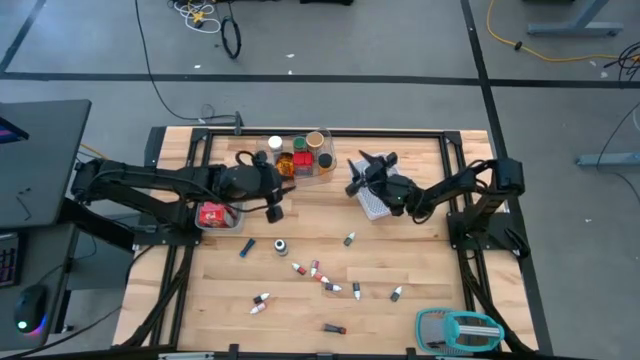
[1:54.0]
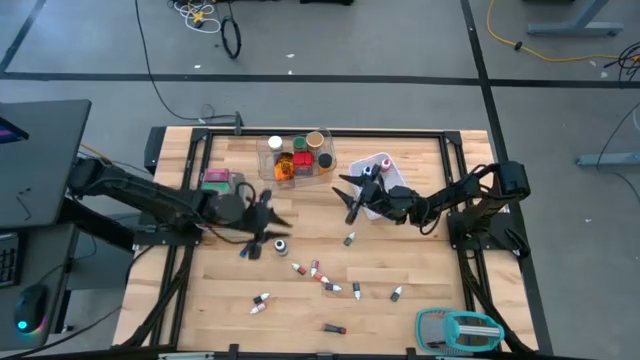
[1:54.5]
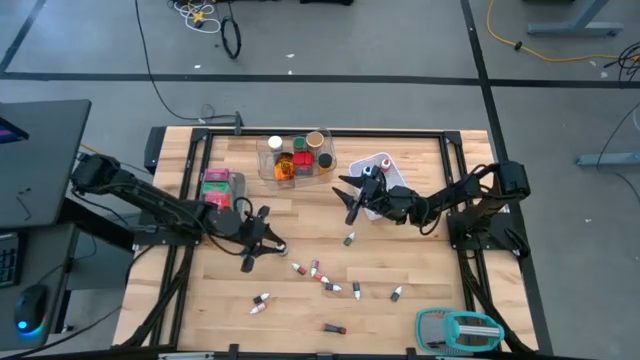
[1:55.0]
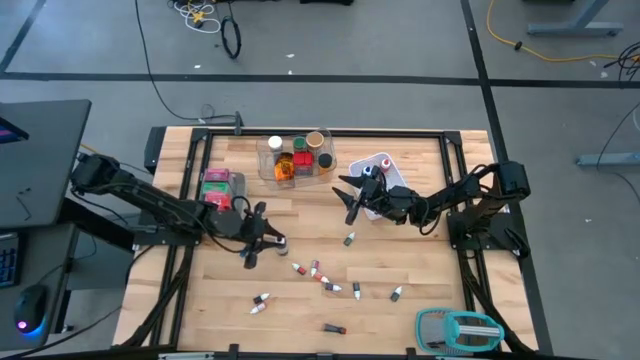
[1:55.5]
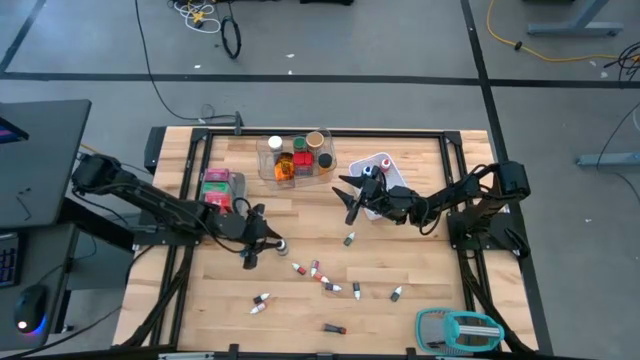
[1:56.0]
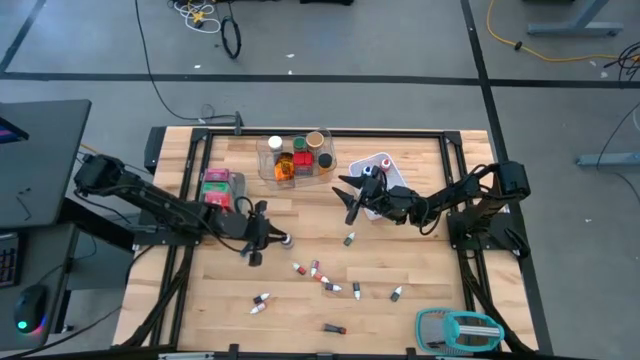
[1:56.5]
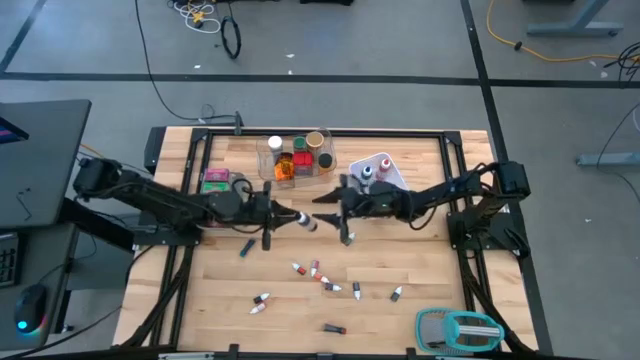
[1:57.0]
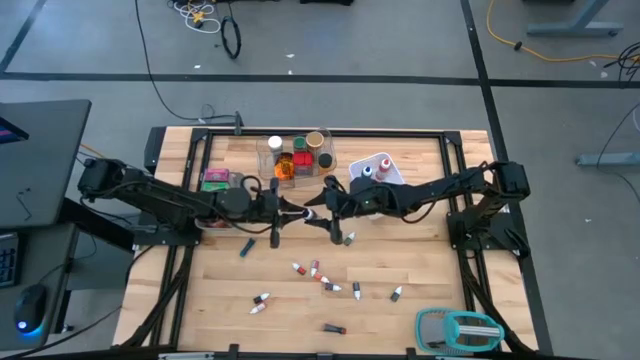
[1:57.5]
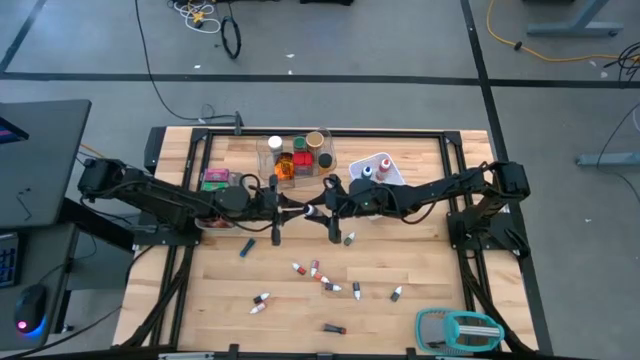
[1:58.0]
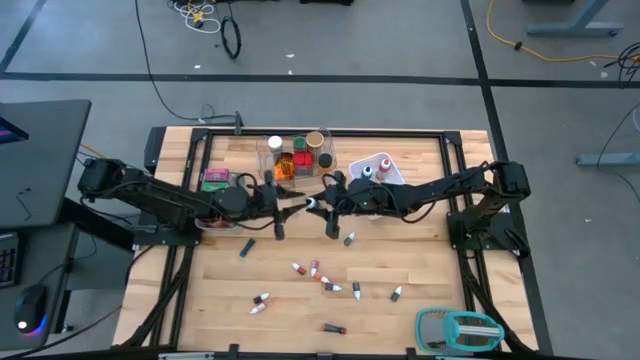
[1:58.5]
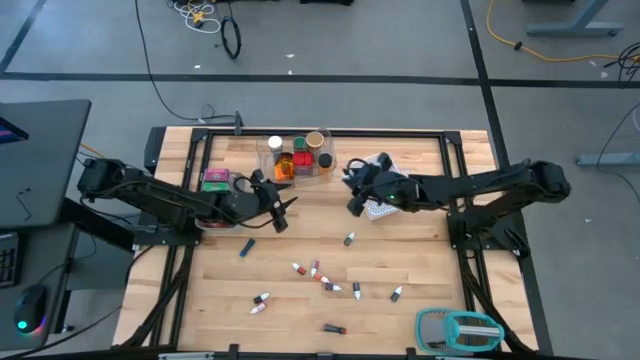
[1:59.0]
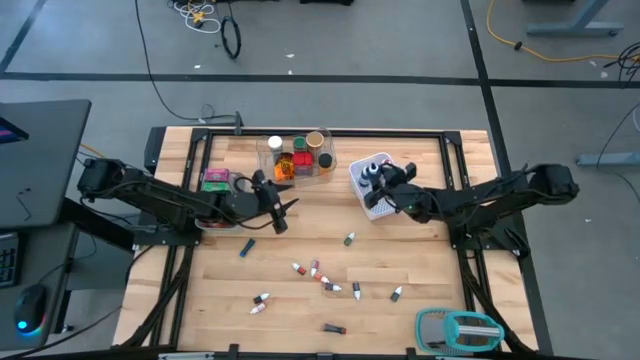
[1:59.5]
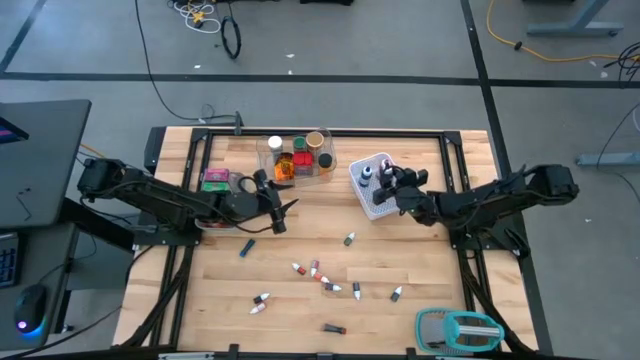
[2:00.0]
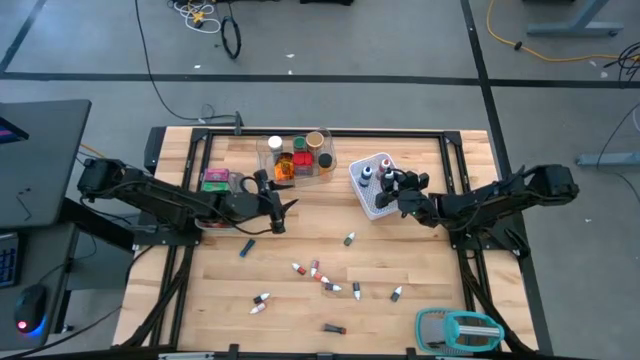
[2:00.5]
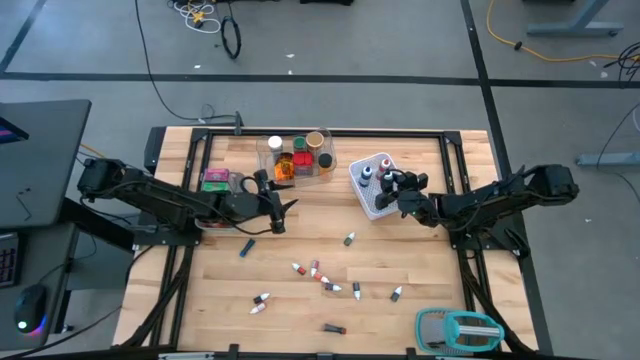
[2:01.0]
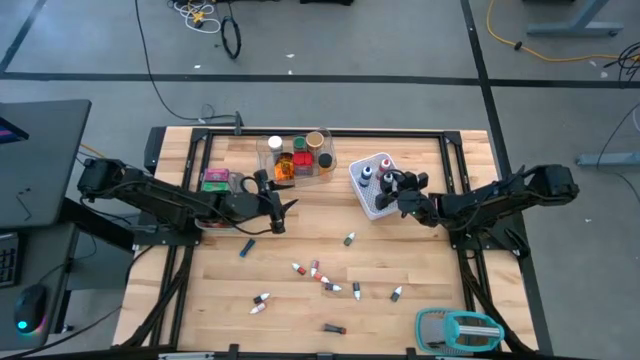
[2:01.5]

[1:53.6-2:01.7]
Task: Pick & Place Kitchen Items
Put the big black food coloring bottle into the white bin

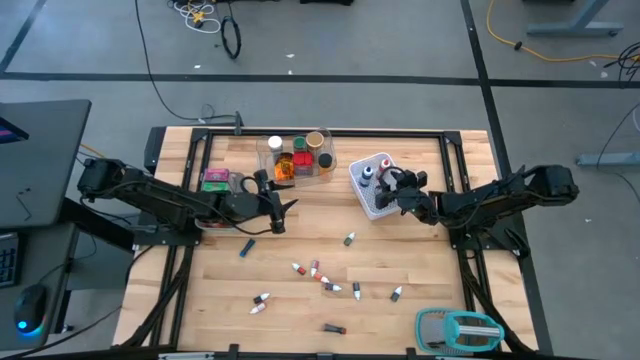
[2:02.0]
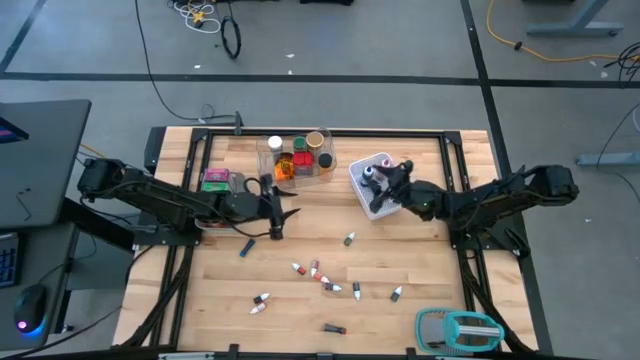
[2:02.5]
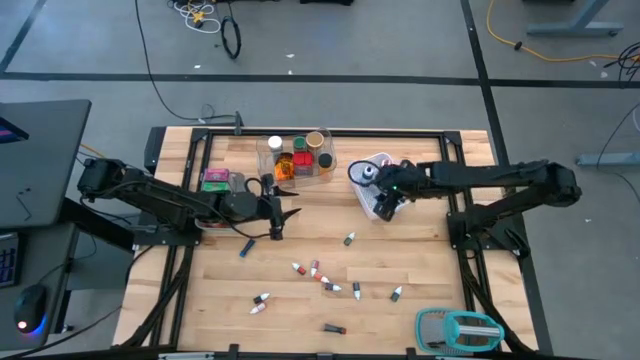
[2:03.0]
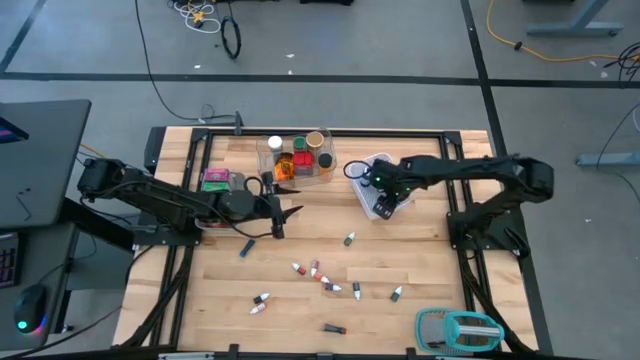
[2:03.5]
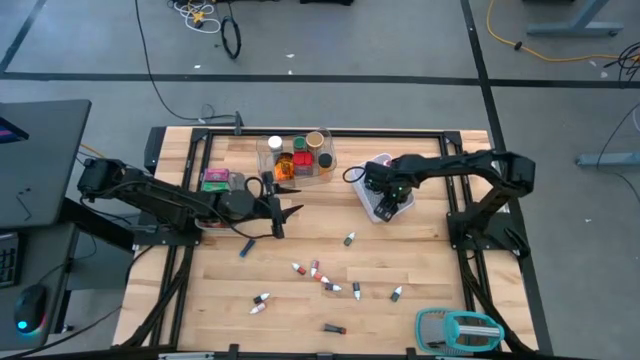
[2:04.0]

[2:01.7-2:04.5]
Put the big black food coloring bottle into the white bin

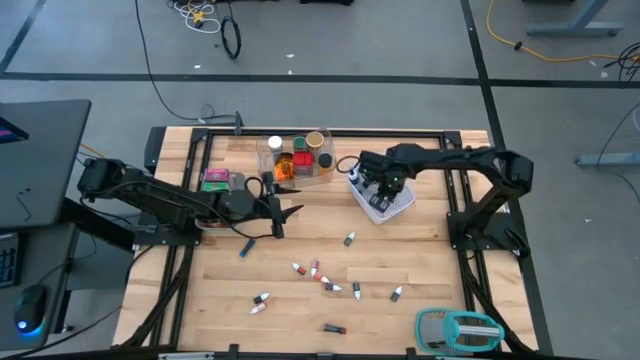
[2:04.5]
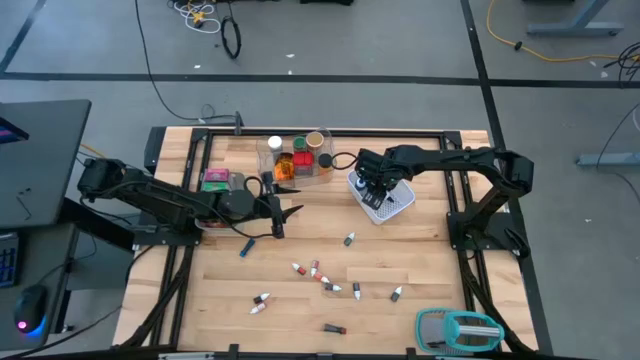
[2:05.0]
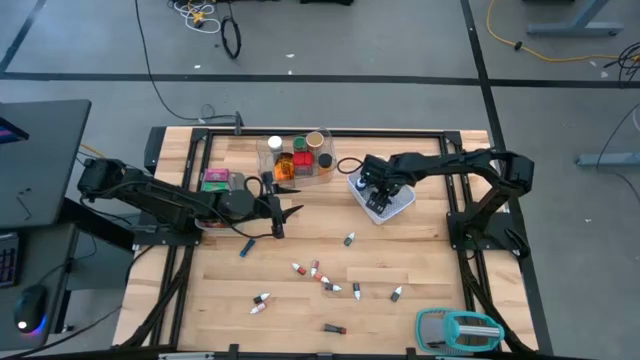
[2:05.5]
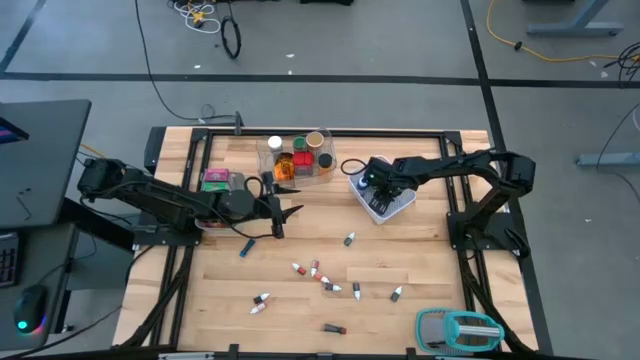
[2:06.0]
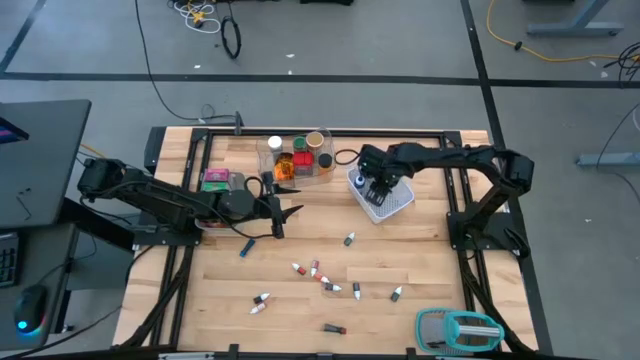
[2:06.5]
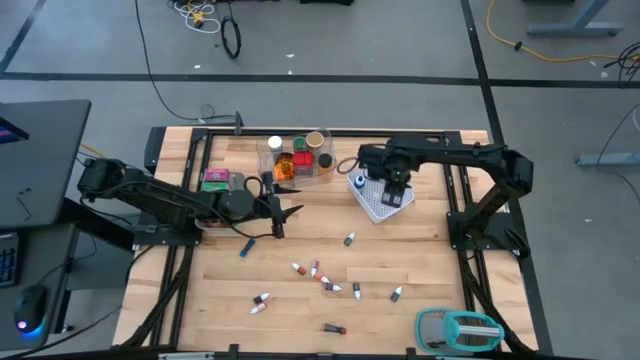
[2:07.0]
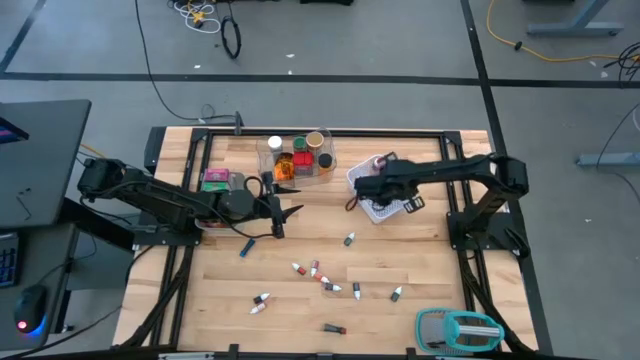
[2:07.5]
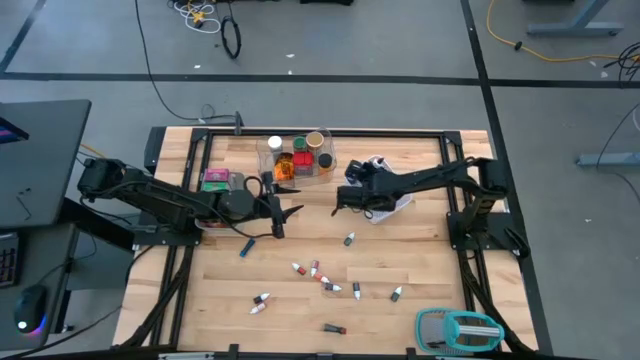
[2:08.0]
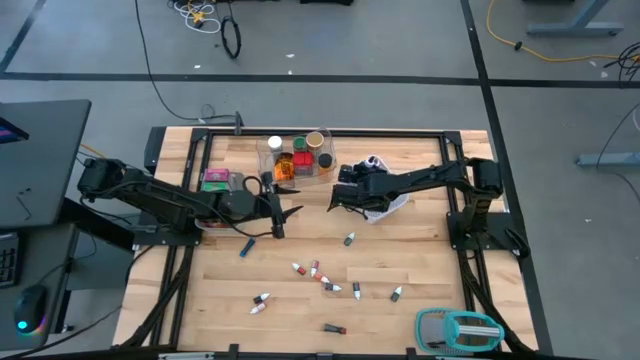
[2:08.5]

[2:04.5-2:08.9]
Put the big black food coloring bottle into the white bin

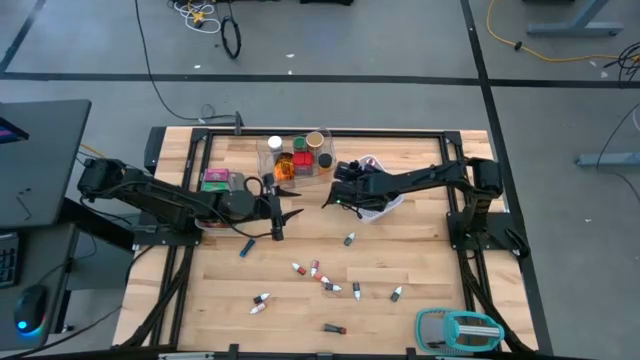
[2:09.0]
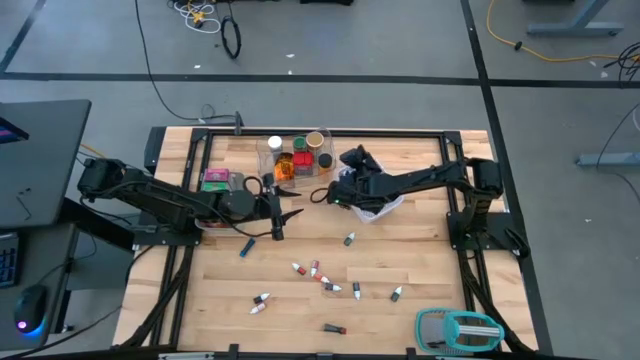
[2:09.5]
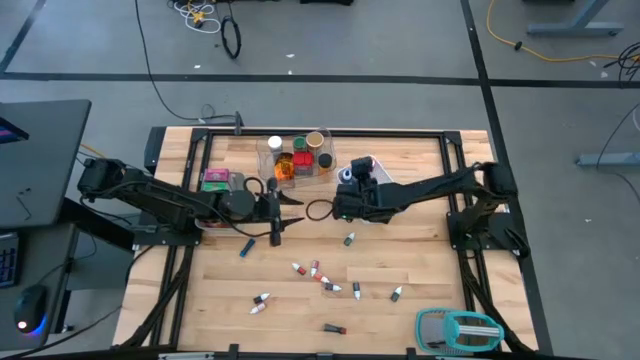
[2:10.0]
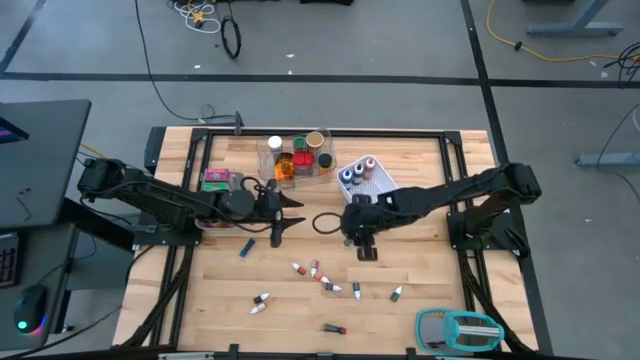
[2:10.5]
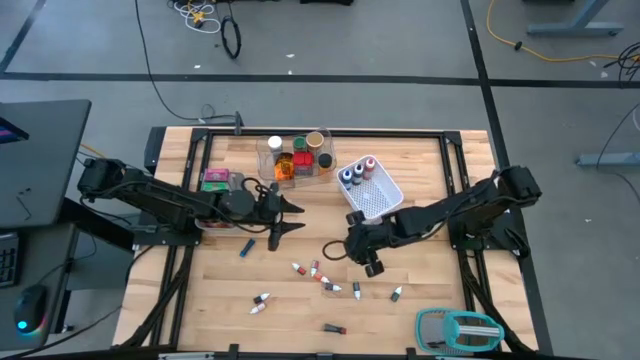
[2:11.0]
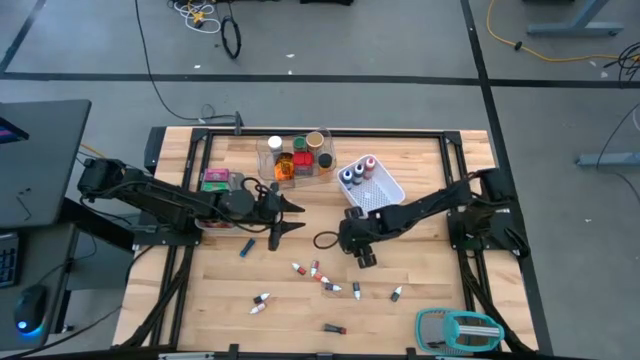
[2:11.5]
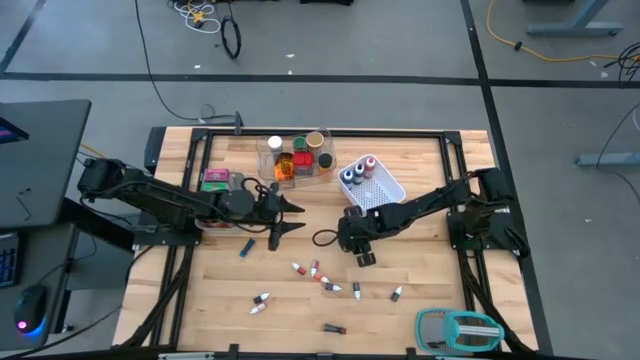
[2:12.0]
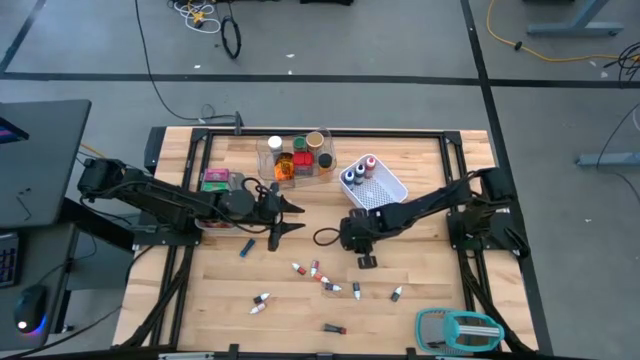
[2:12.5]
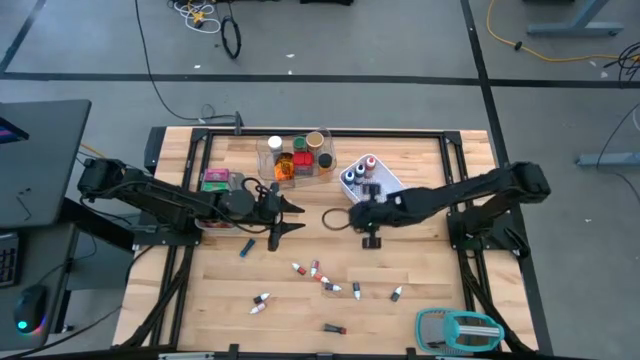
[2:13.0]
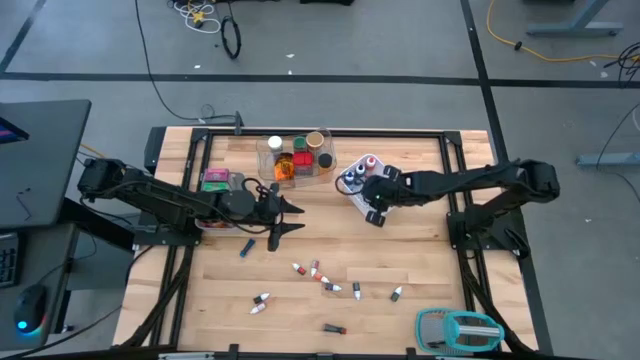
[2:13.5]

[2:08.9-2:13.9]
Put the green food coloring bottle into the white bin

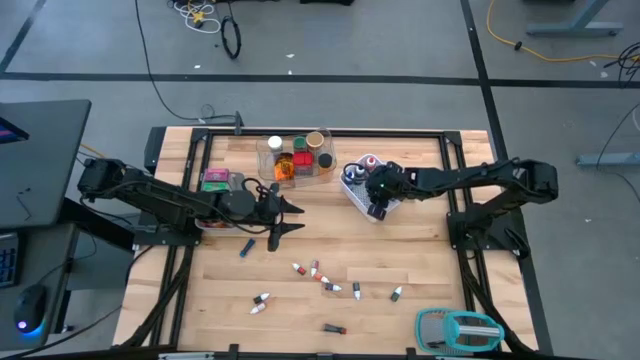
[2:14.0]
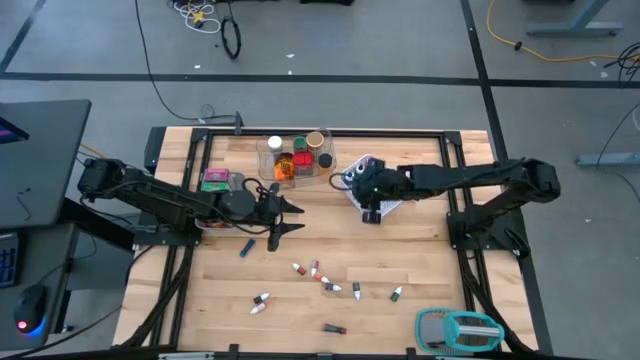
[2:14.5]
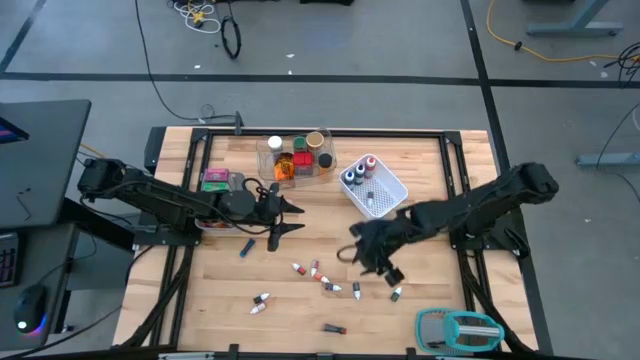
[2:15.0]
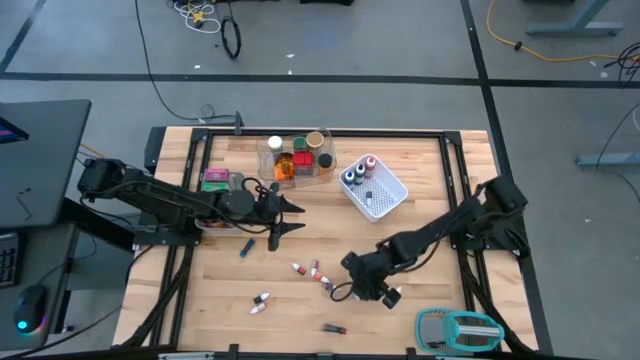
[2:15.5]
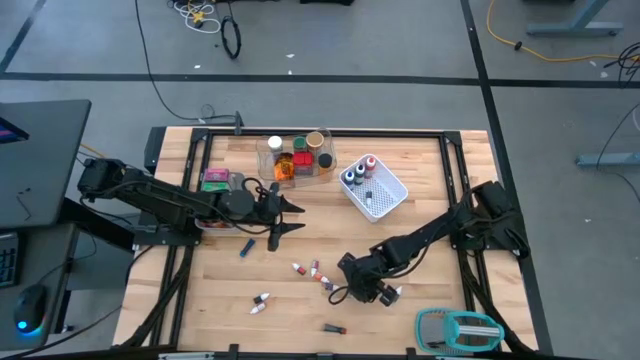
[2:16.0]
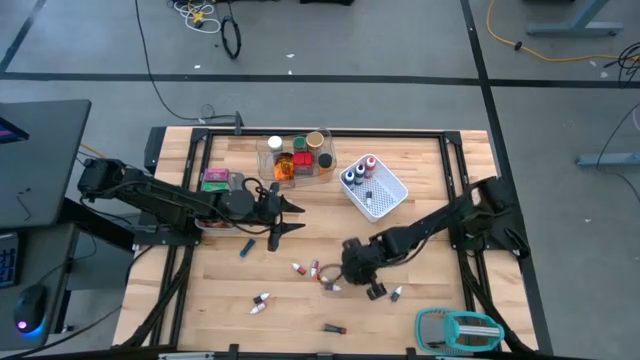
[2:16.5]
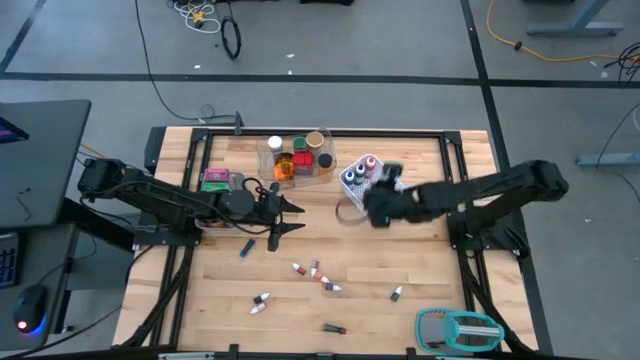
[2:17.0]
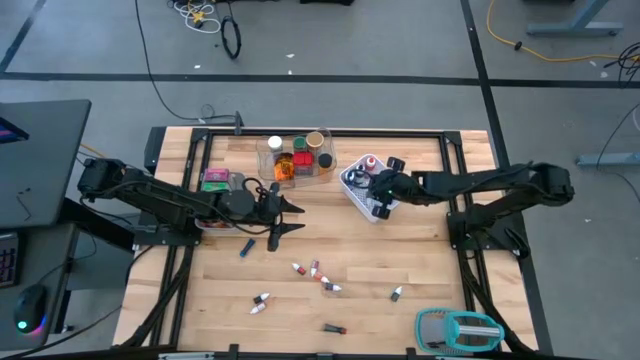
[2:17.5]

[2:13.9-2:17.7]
Put the middle black food coloring bottle into the white bin
